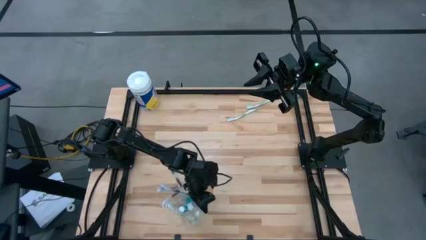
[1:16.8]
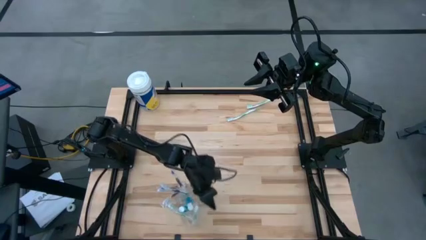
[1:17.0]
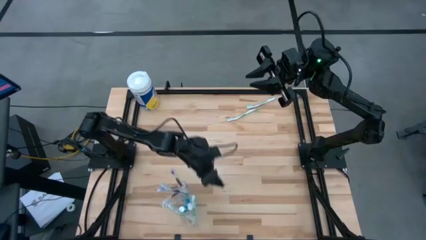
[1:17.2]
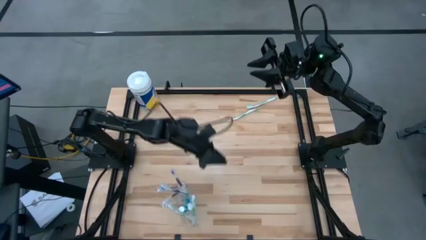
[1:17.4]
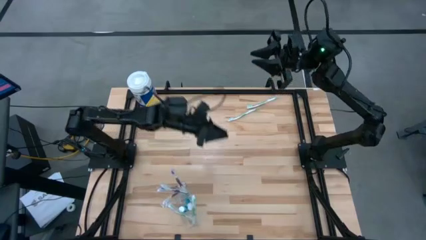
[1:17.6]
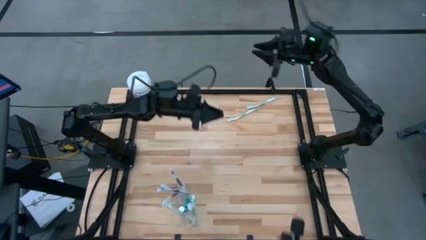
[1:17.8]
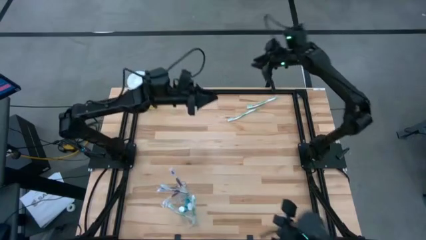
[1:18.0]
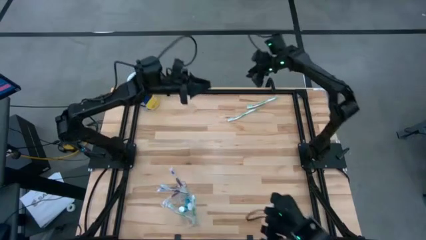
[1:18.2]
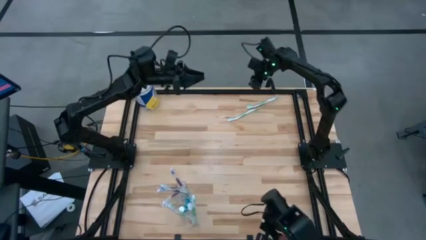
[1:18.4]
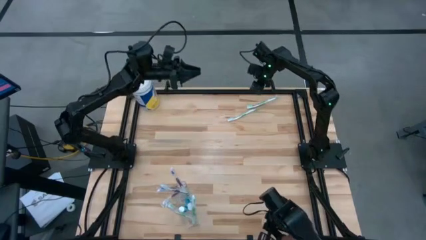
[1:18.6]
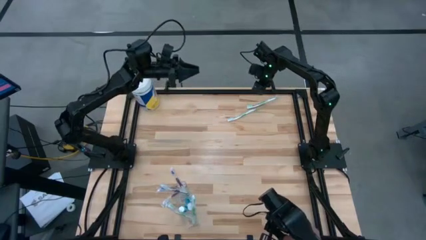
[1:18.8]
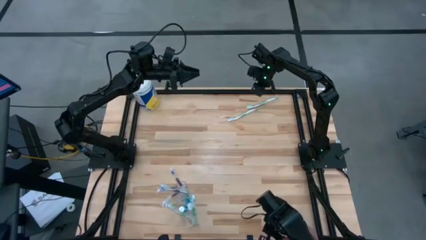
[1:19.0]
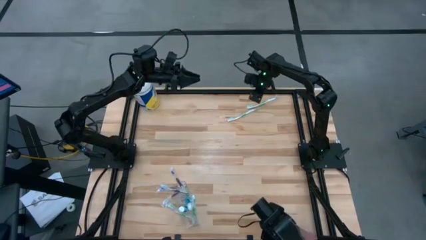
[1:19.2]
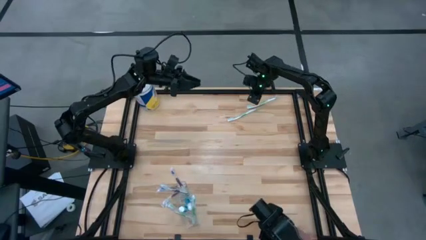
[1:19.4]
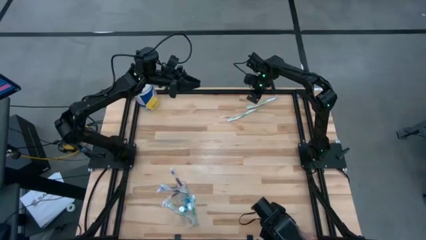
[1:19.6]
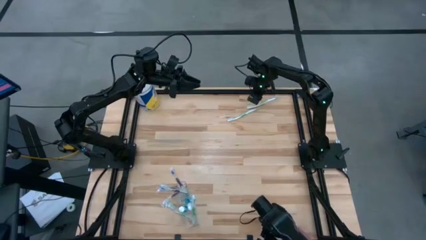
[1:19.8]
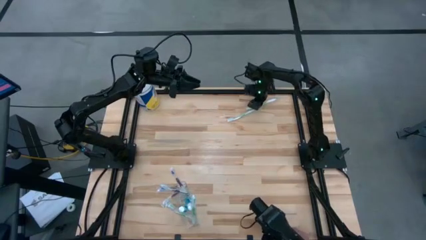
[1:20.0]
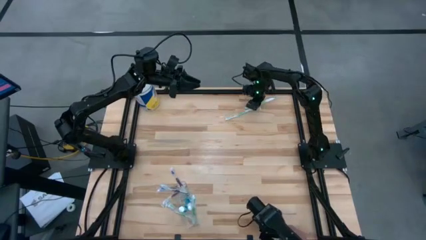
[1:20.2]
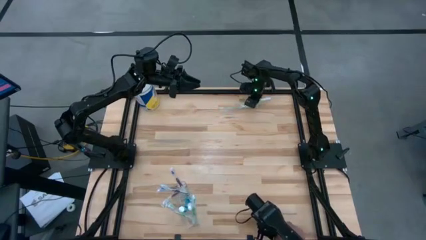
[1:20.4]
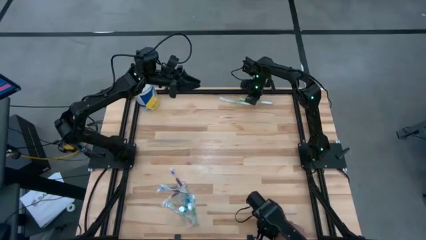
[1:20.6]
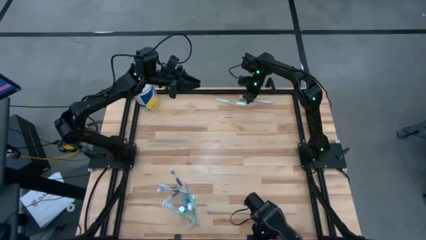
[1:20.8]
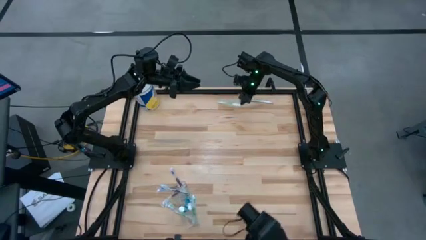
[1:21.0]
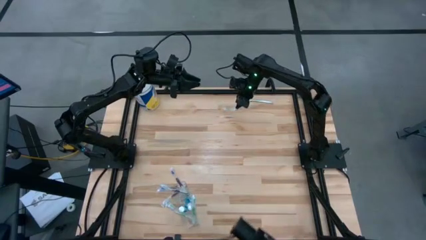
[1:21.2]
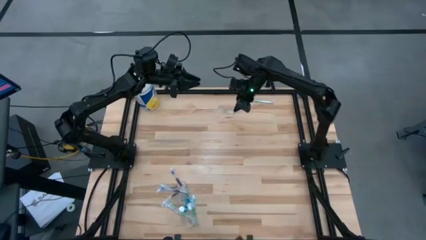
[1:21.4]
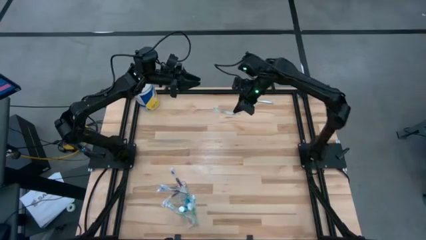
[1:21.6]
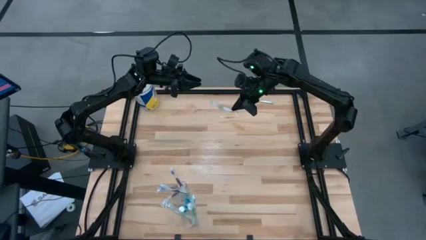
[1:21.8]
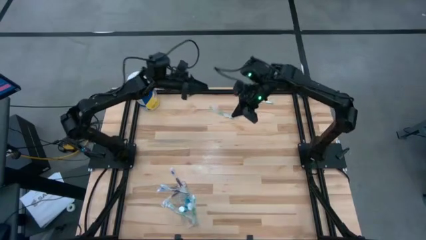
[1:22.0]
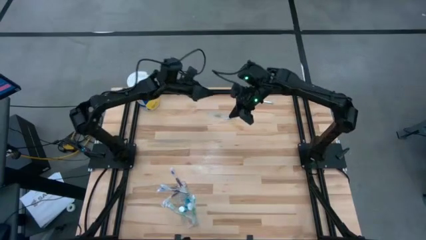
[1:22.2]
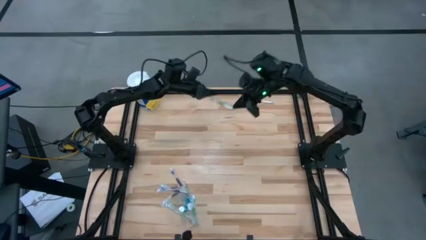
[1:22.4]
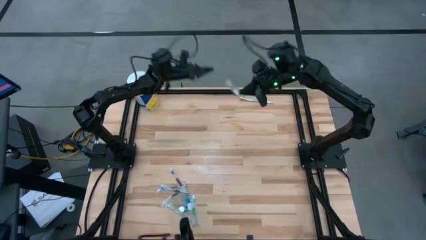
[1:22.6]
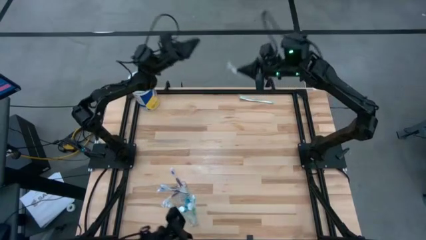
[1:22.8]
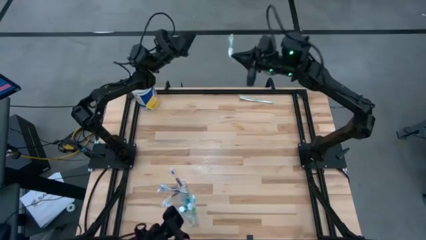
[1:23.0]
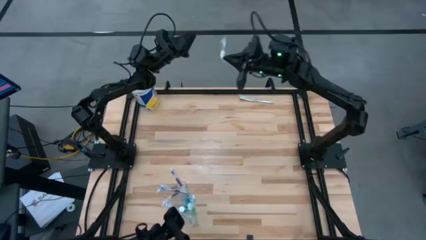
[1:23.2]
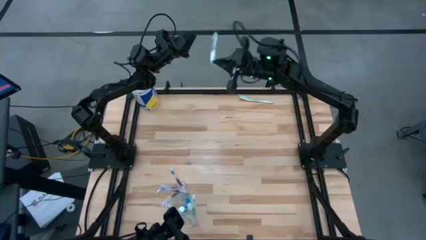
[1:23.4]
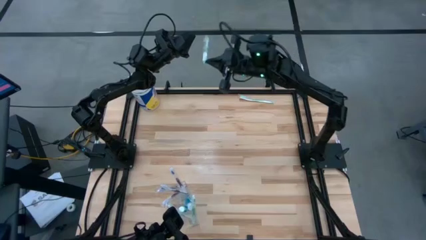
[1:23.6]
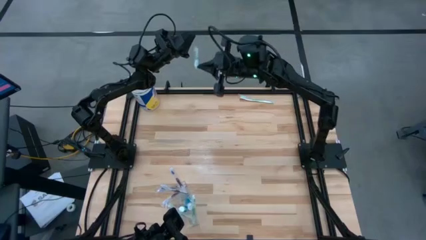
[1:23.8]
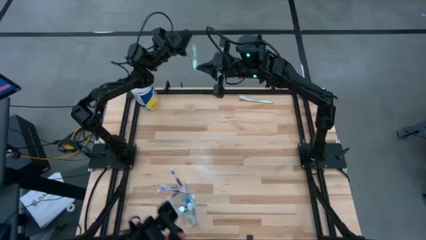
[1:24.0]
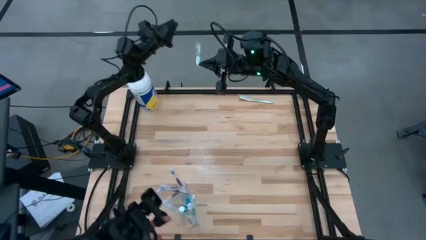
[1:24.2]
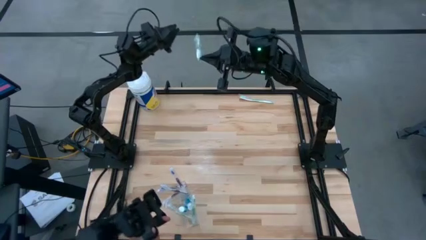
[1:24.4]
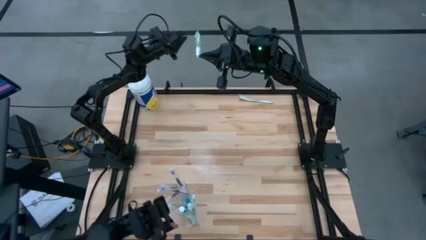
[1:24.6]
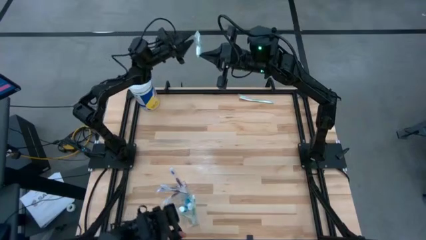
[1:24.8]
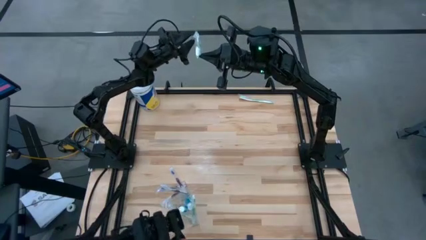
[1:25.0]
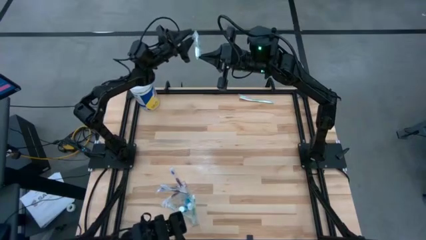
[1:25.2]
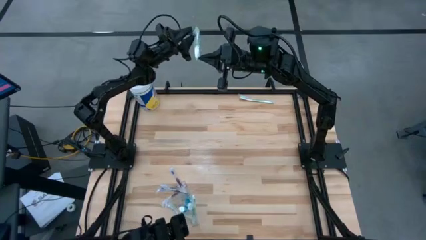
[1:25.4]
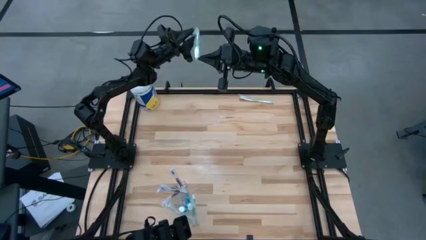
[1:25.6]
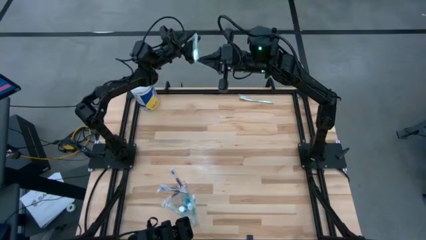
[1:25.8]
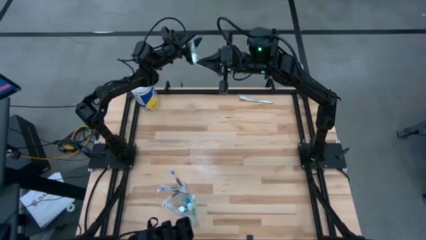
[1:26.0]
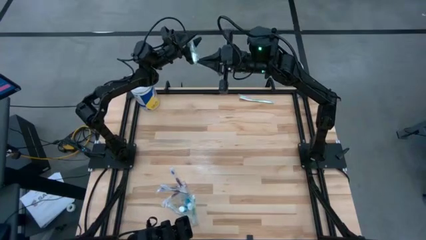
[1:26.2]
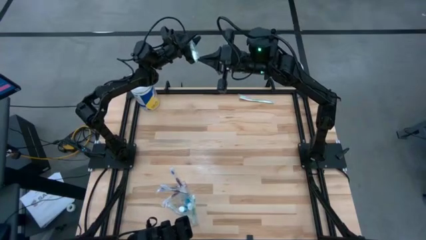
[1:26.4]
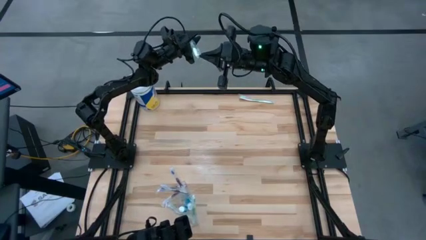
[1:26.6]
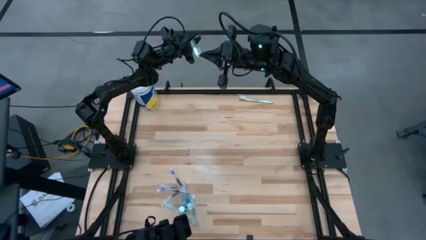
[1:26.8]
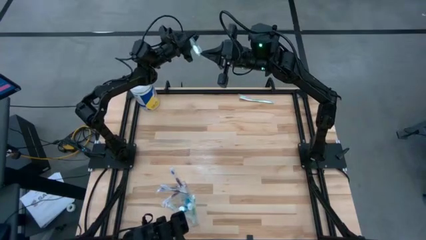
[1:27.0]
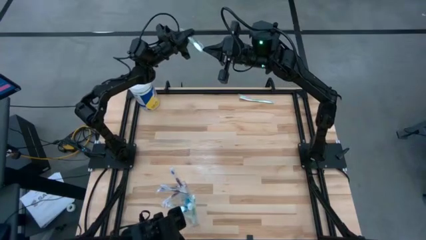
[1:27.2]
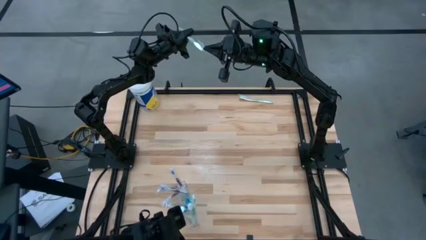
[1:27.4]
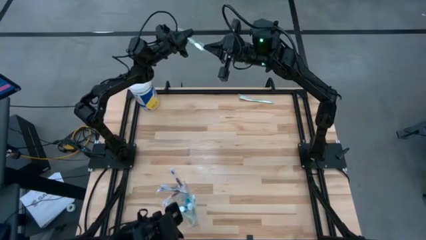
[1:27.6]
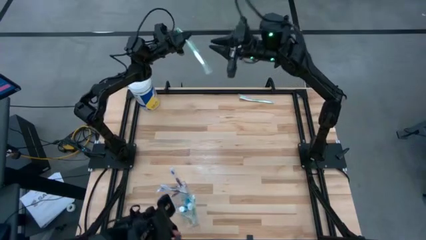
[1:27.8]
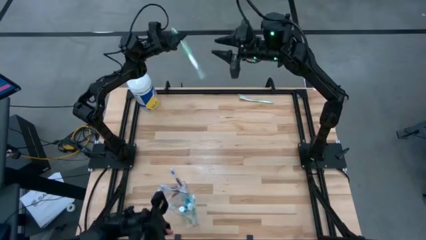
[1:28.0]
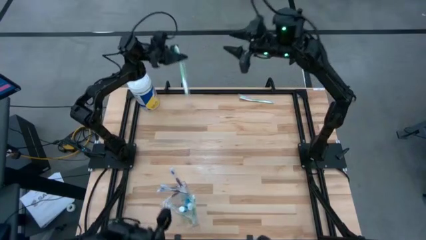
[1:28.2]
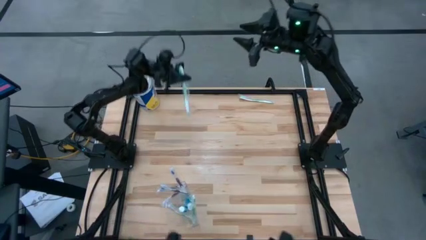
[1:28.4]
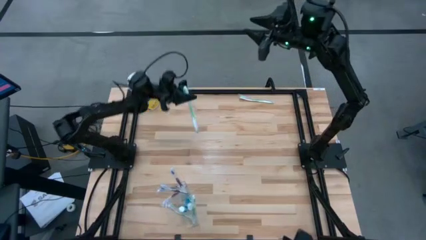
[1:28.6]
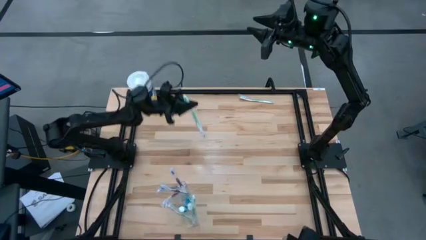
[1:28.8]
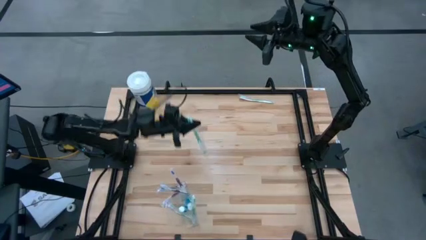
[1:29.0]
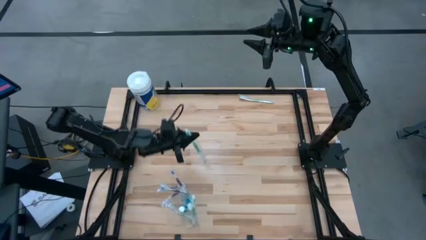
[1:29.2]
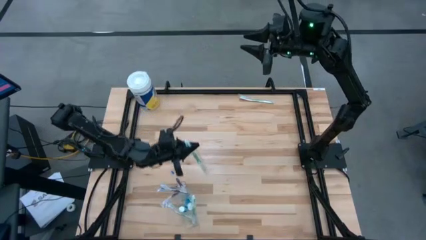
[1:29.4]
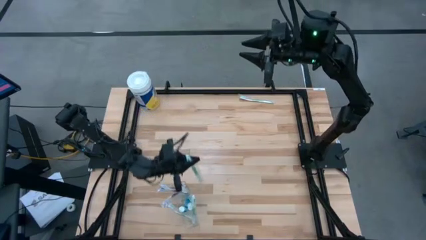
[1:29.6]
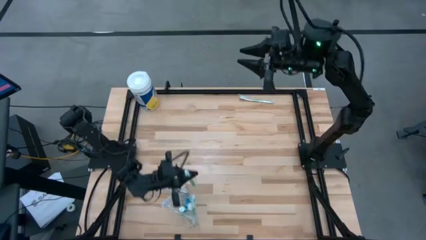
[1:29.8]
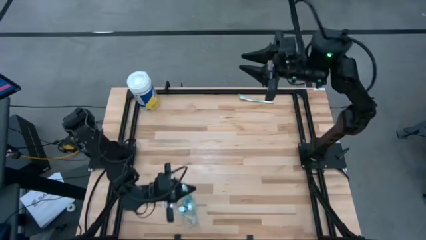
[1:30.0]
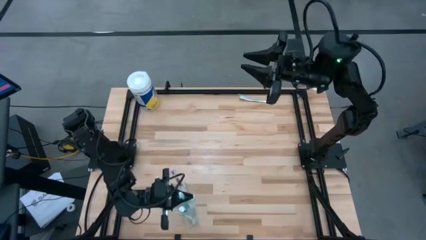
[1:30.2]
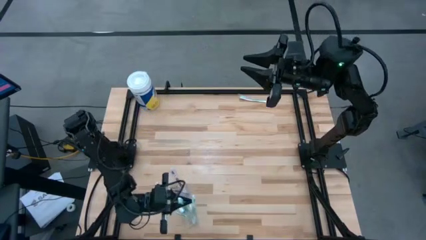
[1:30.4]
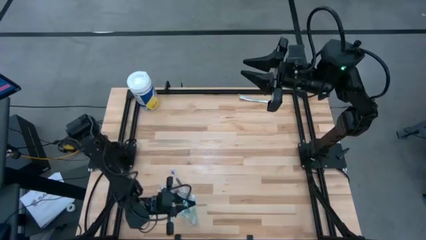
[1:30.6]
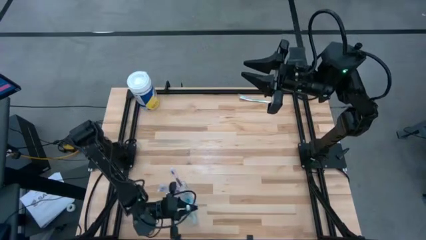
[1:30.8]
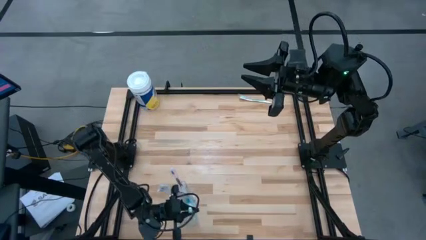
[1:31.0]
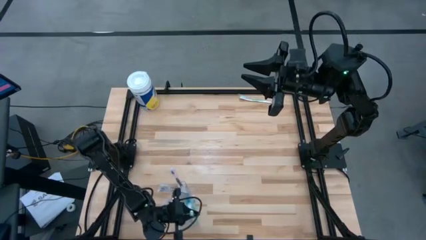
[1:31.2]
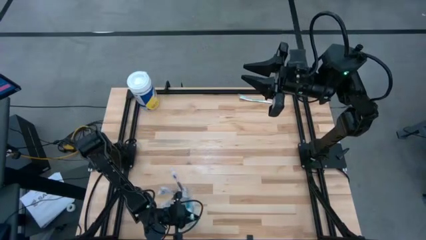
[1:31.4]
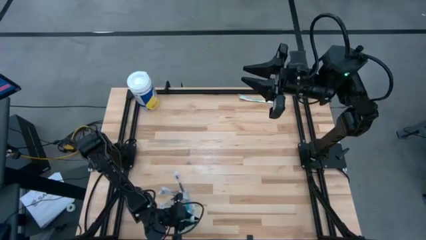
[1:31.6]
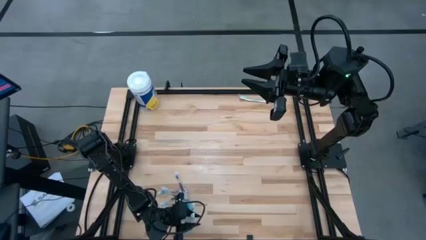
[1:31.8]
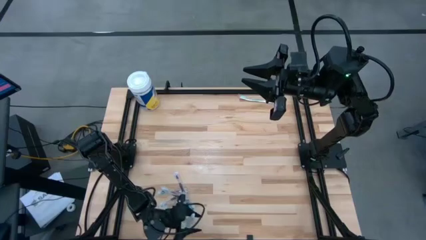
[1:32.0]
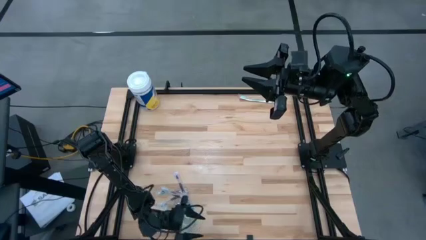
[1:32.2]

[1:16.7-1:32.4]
Task: Pick & Place toothbrushing station
Put the green toothbrush into the transparent organizer

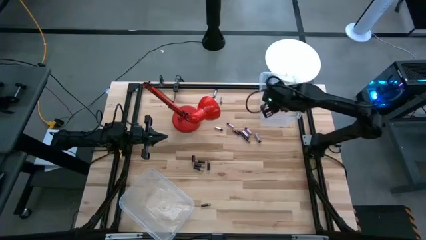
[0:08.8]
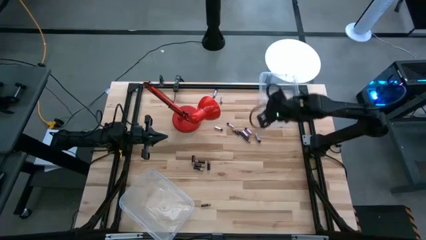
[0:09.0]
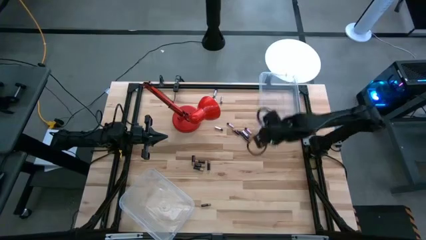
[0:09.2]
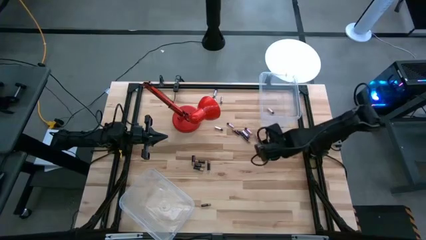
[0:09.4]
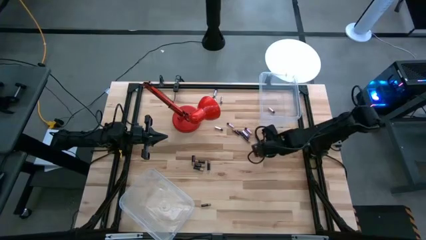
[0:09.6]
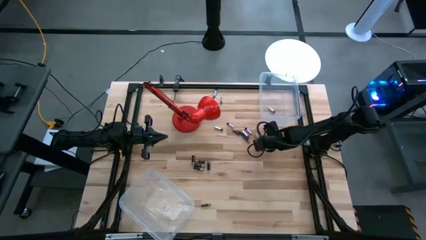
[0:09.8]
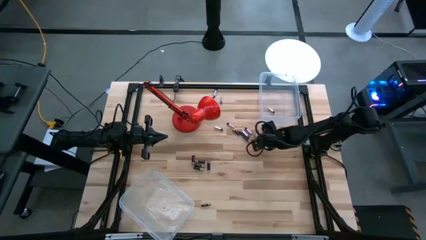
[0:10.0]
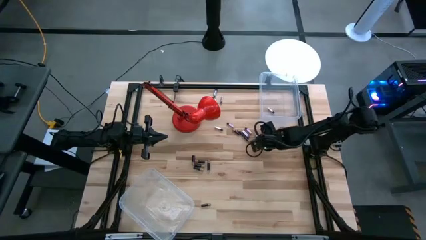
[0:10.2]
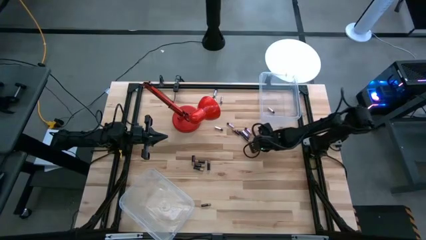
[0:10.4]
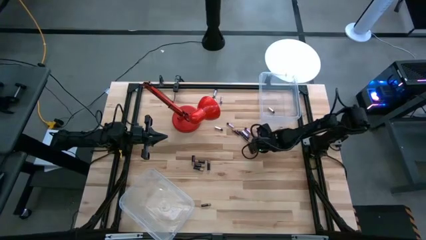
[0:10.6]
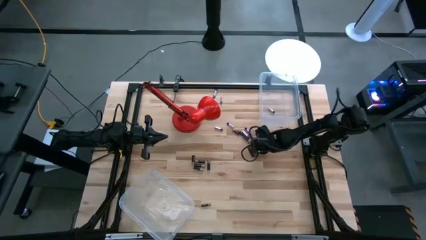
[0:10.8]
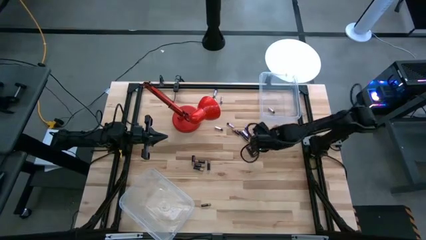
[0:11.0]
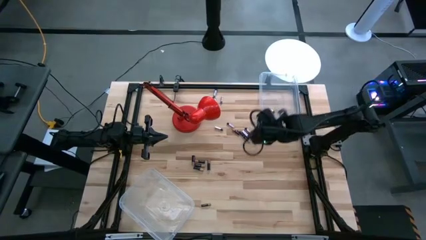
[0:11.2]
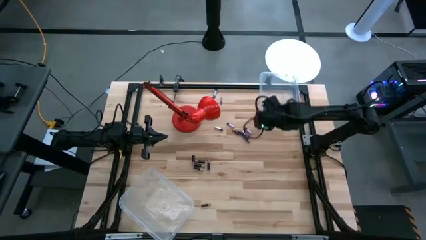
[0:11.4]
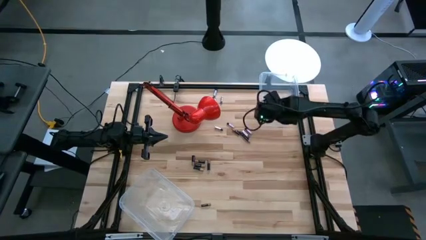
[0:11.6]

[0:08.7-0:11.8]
Task: Sort batteries
Put the silver battery into the top transparent bin
